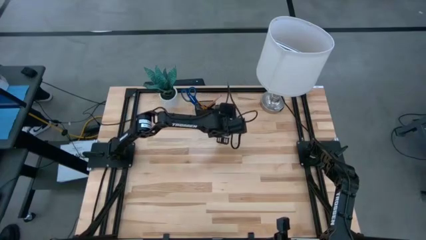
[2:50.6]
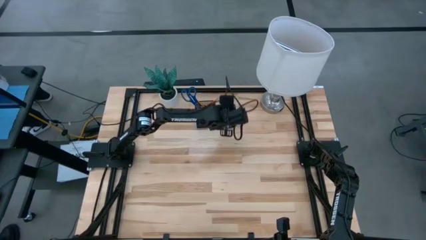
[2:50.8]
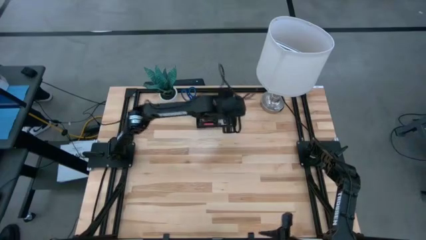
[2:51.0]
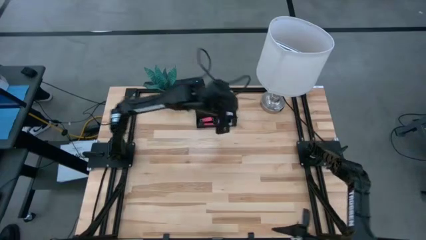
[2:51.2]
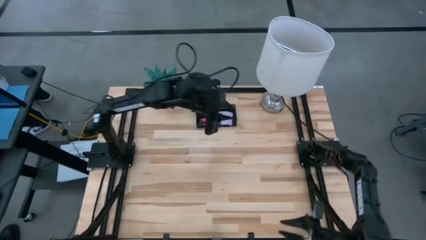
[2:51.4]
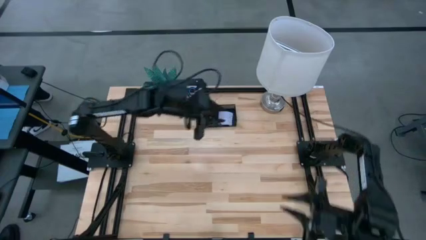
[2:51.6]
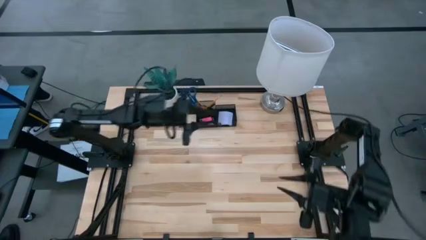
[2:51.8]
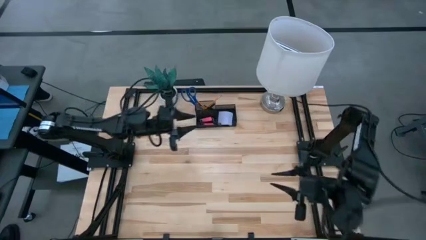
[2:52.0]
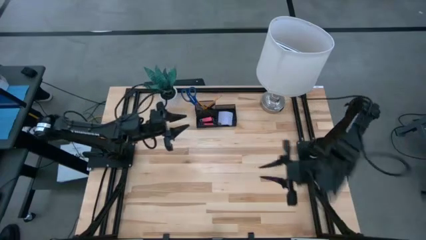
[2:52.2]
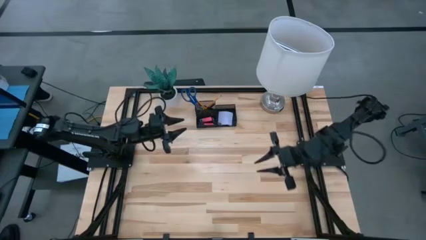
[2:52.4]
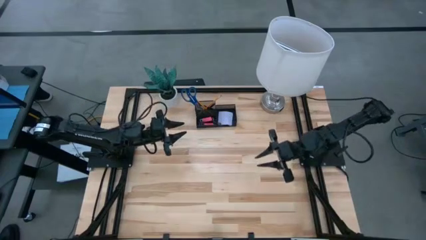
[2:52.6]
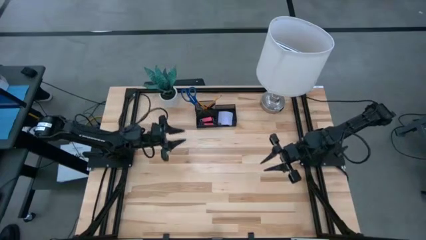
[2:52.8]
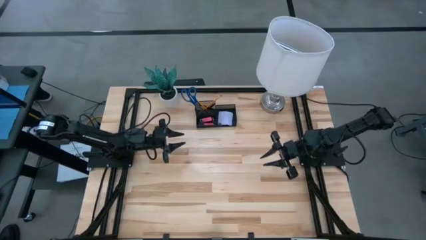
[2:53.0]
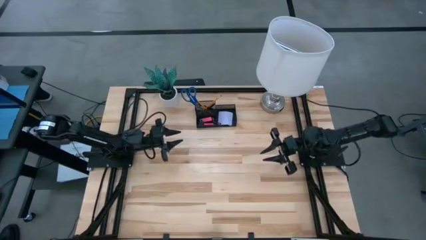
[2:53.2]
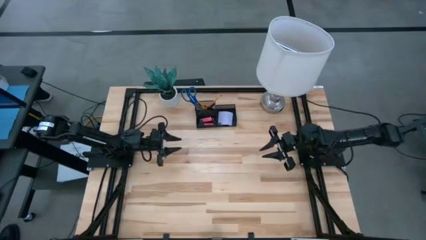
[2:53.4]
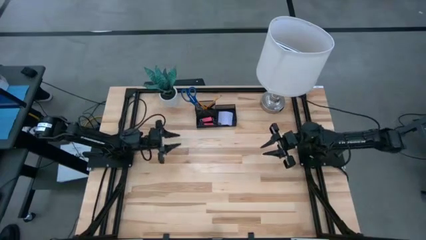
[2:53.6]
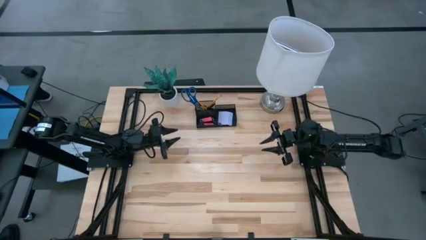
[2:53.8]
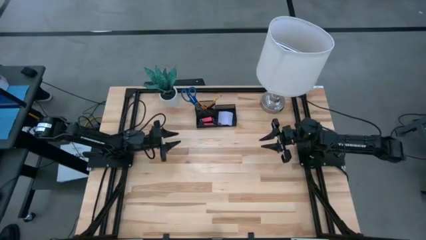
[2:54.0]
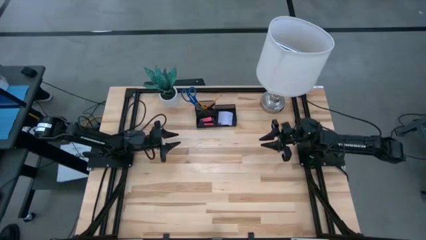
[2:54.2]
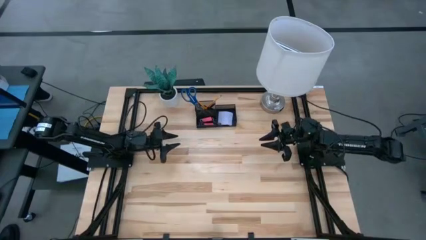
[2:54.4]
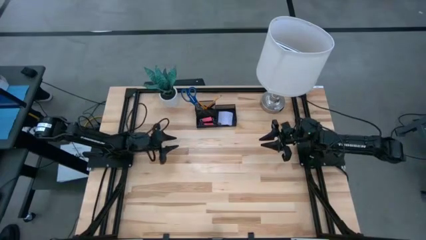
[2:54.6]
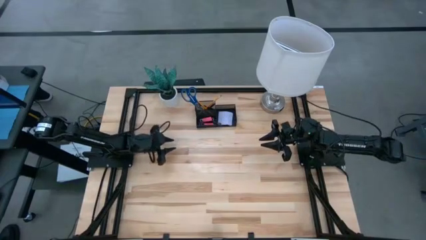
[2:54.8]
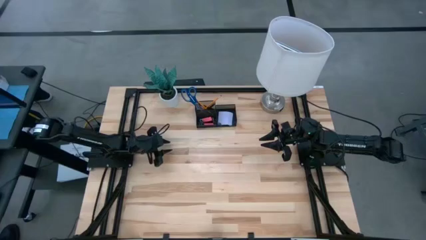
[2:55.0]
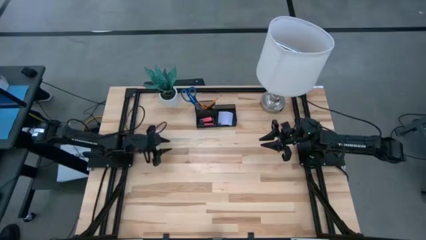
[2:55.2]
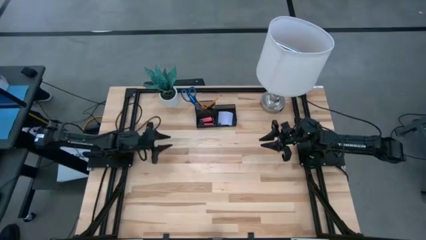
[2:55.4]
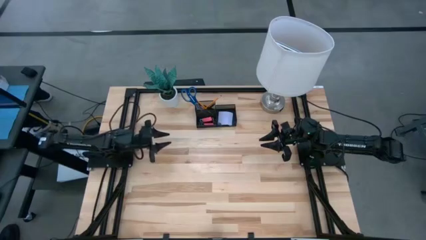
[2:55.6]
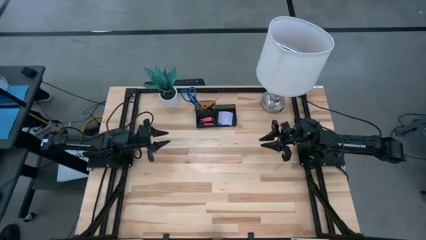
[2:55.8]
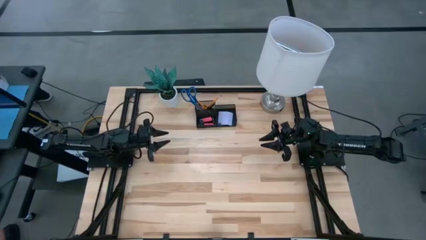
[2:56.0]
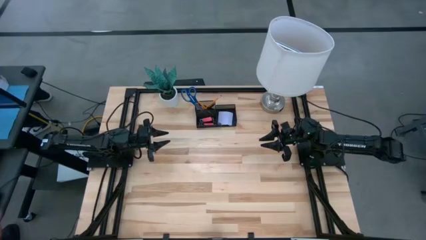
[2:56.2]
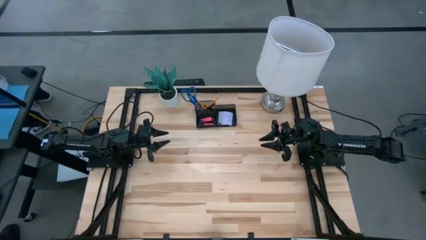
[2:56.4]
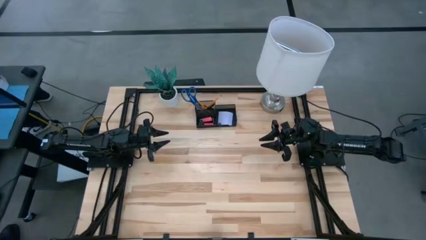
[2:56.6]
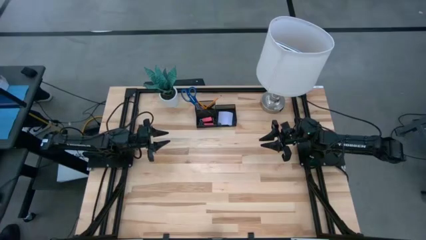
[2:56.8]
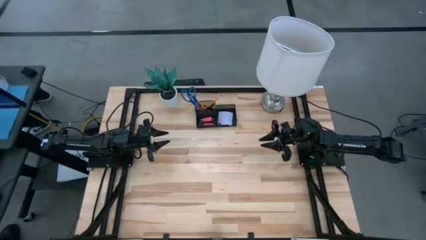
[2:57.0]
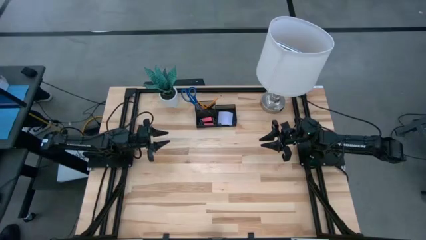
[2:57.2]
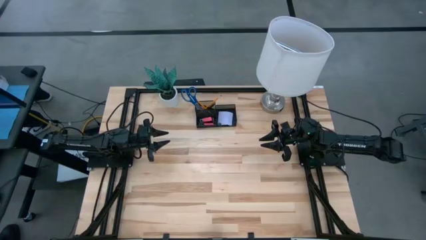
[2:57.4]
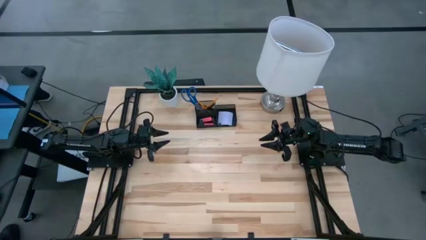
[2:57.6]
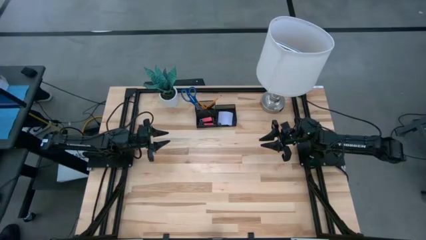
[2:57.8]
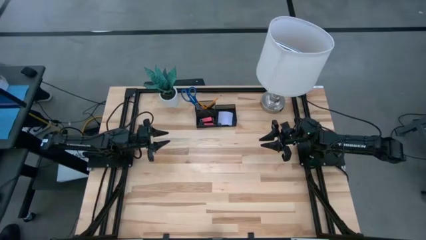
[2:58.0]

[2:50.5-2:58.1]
Task: Pick and place office supplies into organizer
Return to Home Position

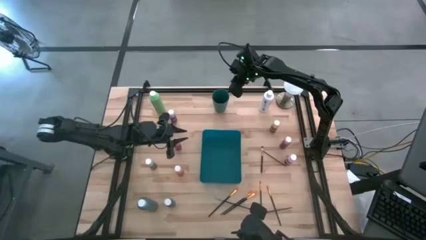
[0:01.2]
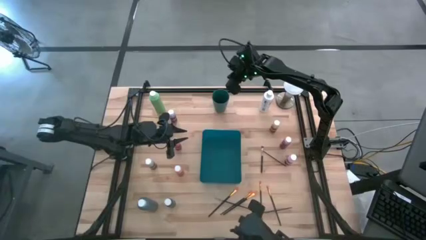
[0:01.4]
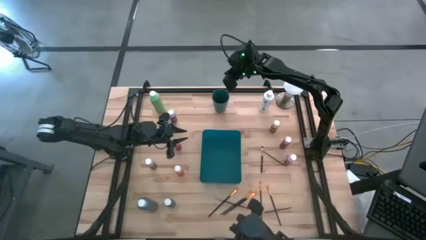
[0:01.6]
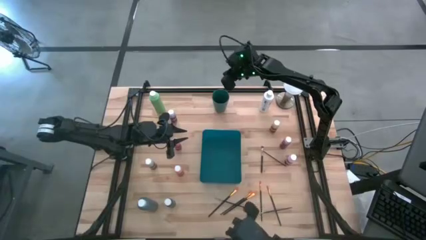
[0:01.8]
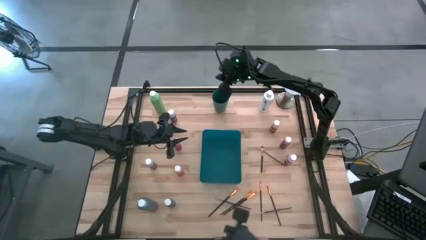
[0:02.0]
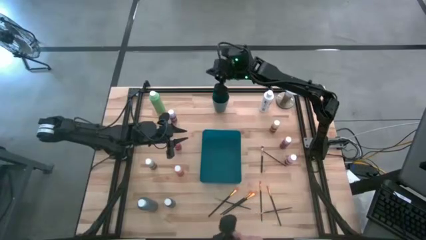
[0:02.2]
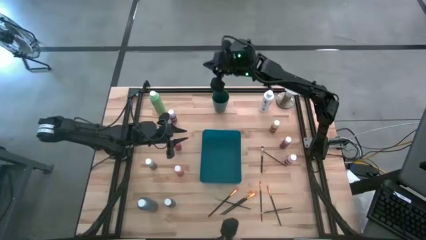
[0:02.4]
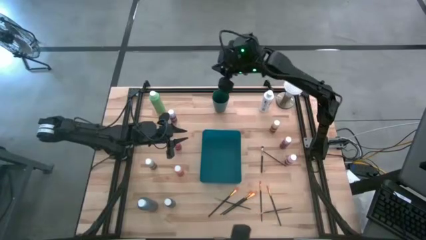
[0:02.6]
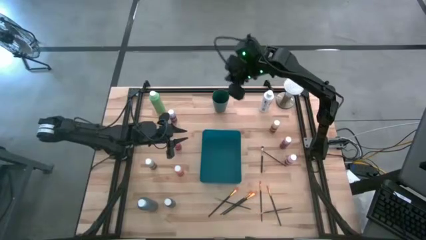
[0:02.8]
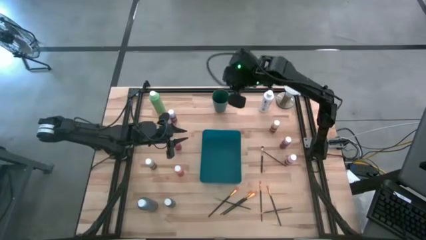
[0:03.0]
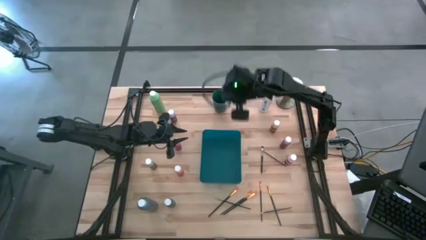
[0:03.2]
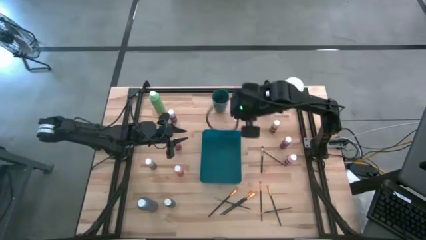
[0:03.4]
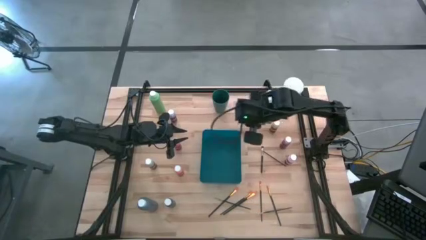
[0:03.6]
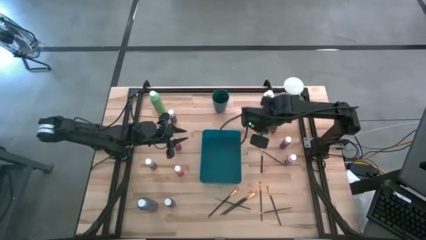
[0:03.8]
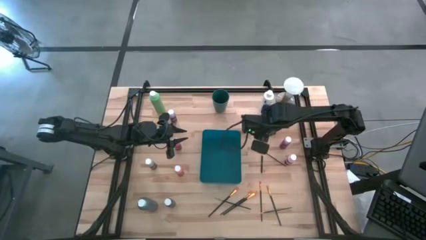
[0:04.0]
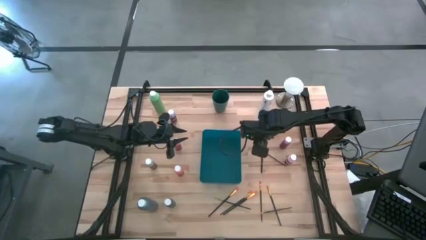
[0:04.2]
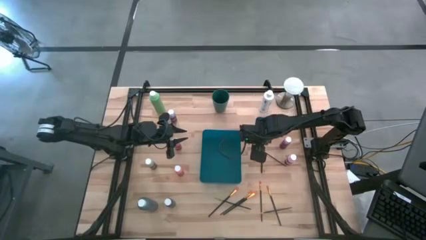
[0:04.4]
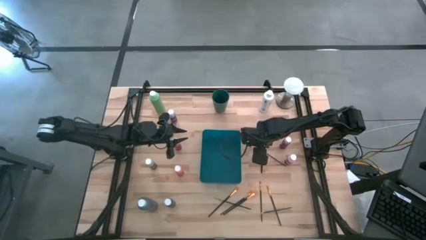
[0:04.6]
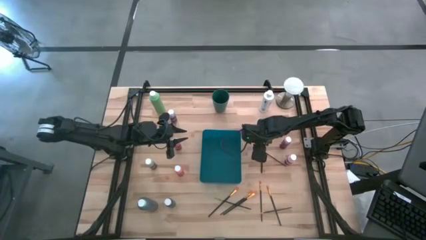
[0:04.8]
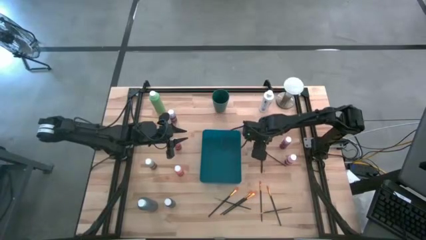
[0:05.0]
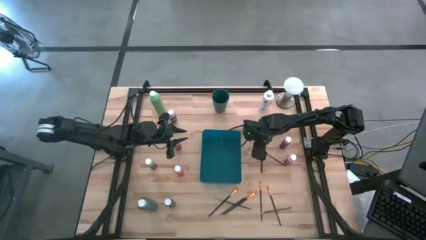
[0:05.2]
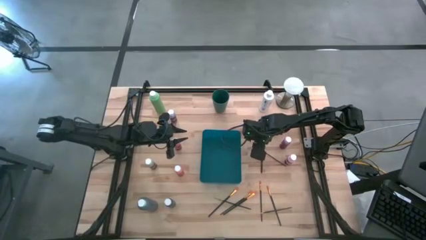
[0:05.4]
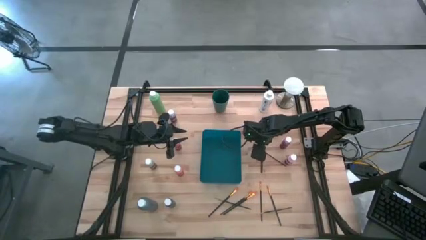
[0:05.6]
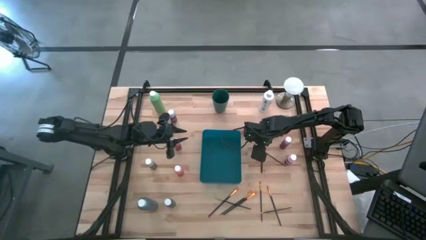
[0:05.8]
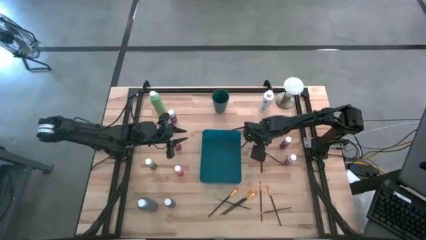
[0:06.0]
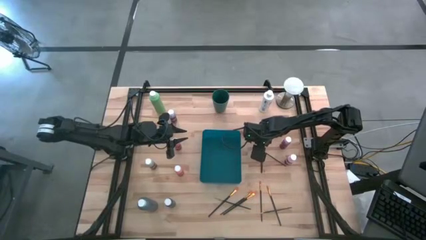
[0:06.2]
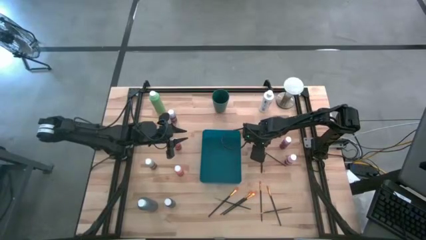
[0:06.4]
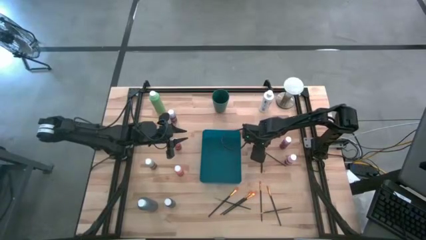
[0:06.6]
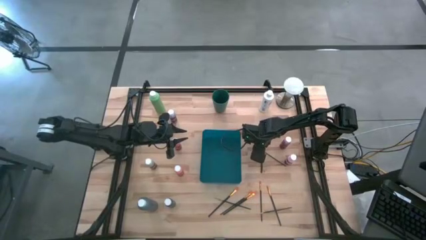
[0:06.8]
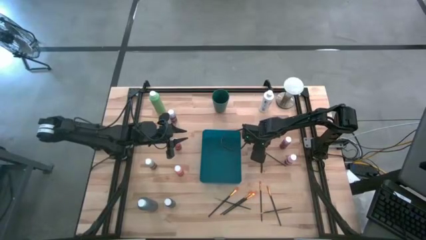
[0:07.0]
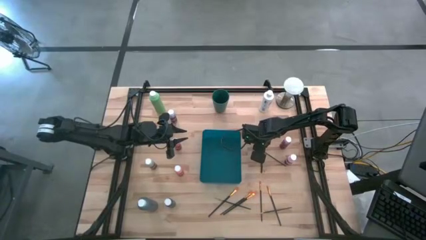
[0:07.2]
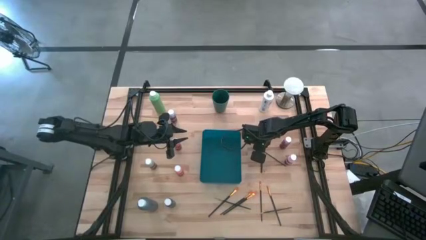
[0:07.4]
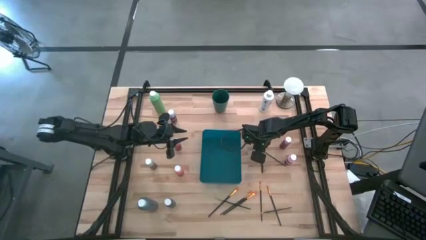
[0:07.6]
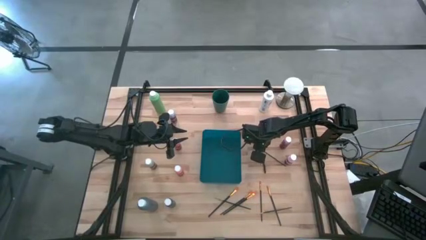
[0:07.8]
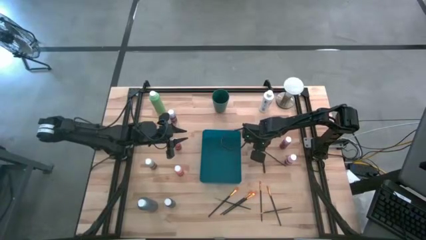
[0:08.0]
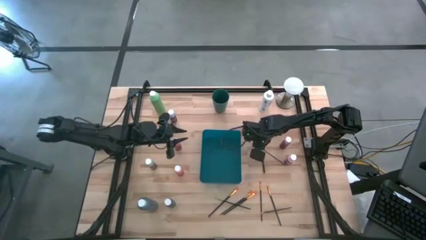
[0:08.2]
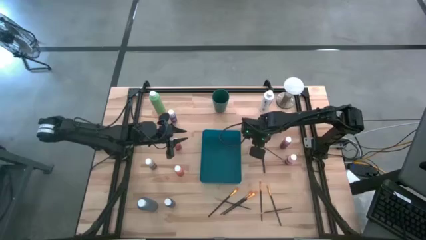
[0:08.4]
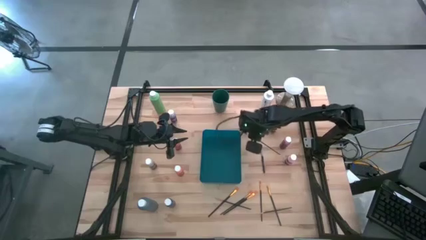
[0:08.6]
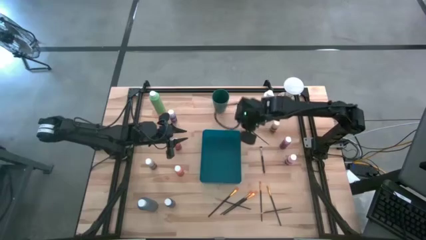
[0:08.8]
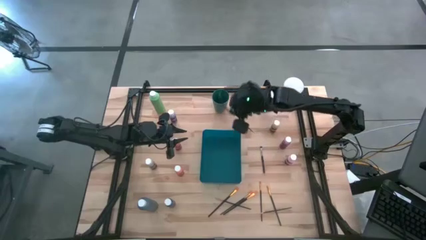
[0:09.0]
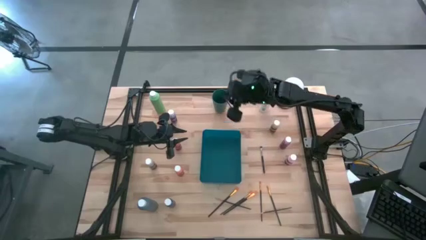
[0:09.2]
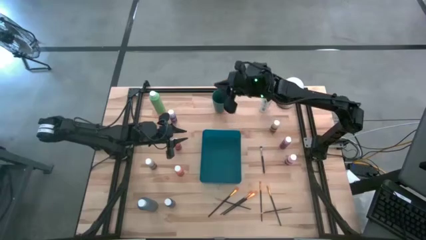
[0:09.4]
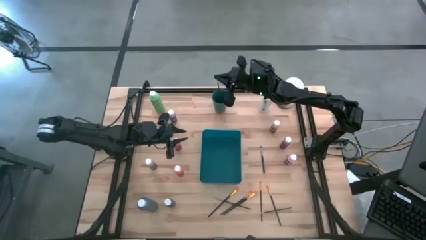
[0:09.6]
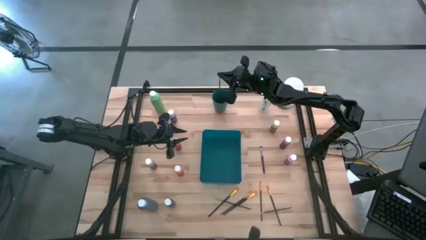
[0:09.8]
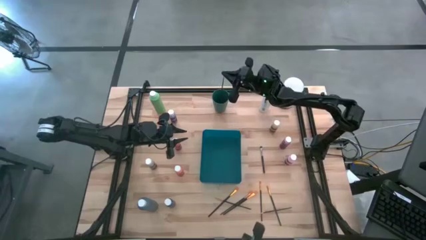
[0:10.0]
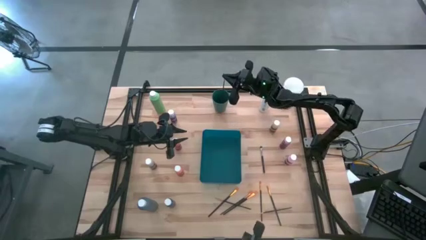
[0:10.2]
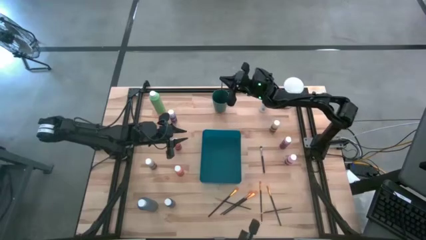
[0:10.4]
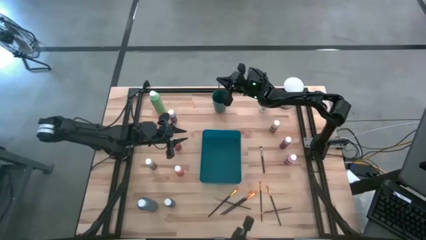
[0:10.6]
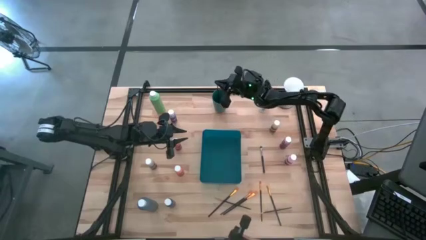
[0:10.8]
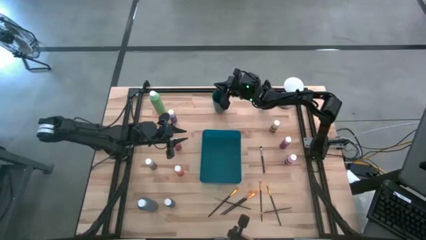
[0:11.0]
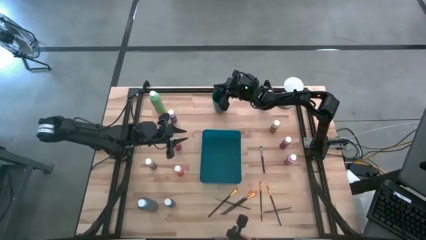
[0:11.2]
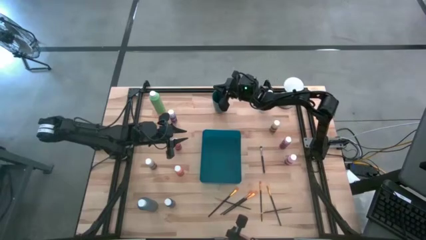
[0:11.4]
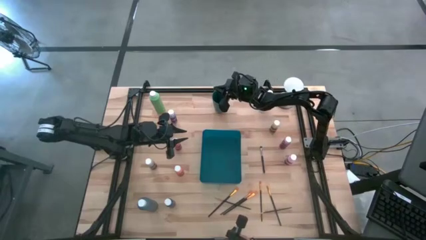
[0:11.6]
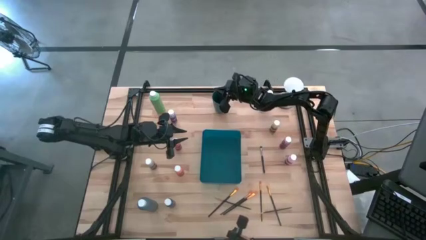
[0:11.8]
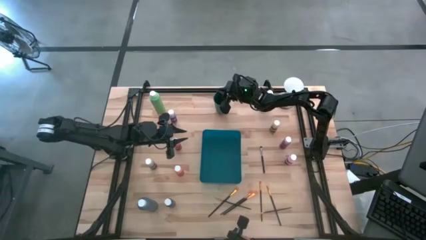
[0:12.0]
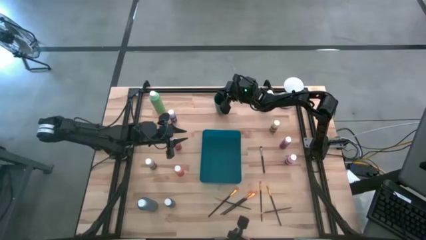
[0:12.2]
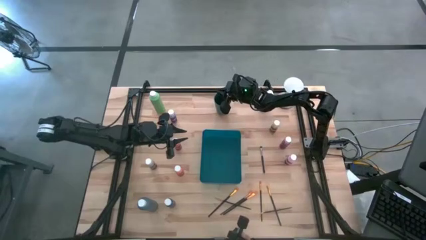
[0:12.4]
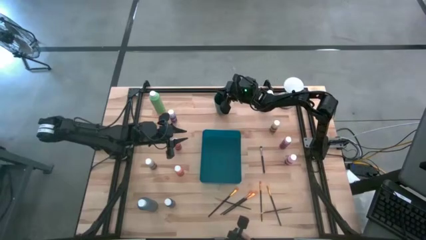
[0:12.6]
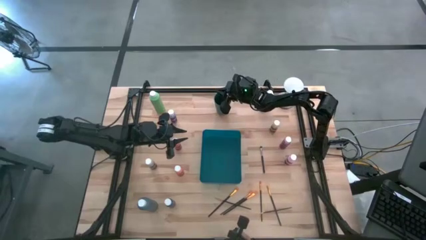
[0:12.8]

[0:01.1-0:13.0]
Task: Pick & Place Paint Supplies
Put the gold paint brush into the green cup
